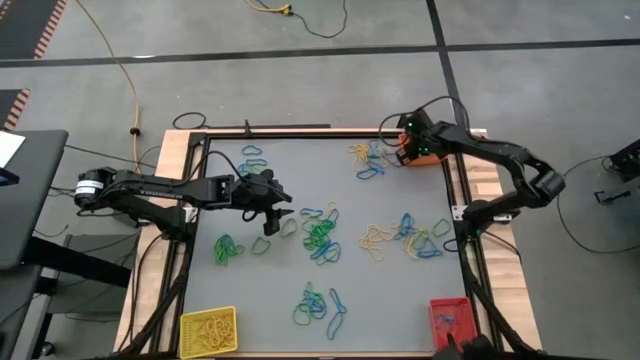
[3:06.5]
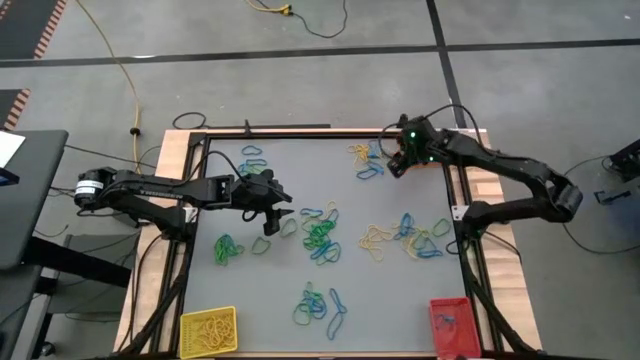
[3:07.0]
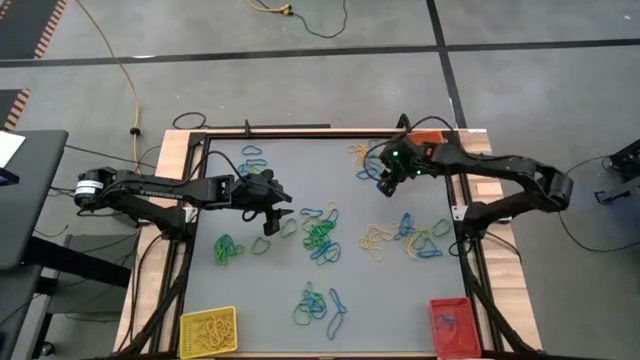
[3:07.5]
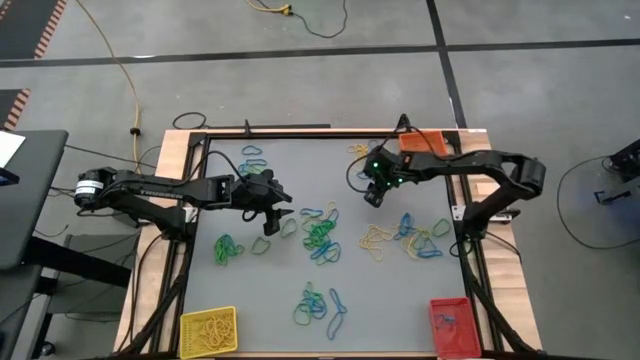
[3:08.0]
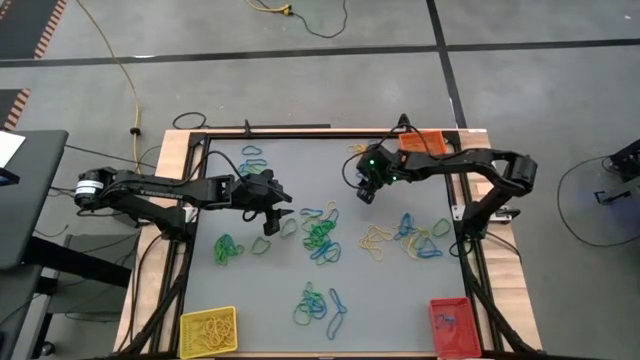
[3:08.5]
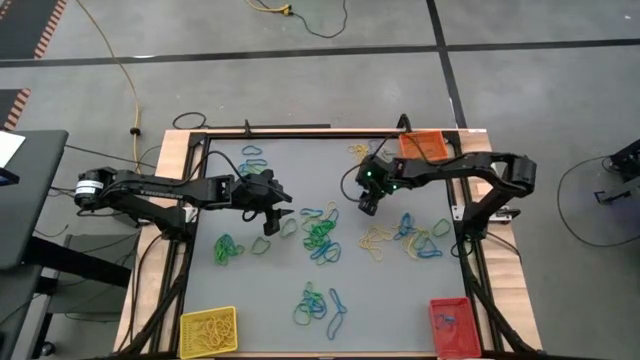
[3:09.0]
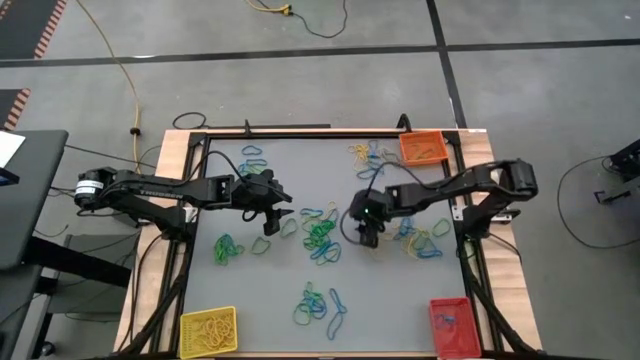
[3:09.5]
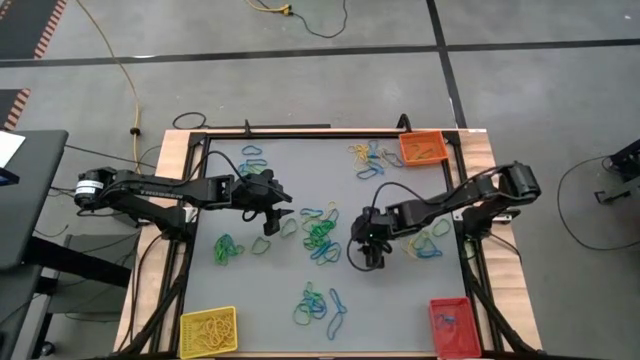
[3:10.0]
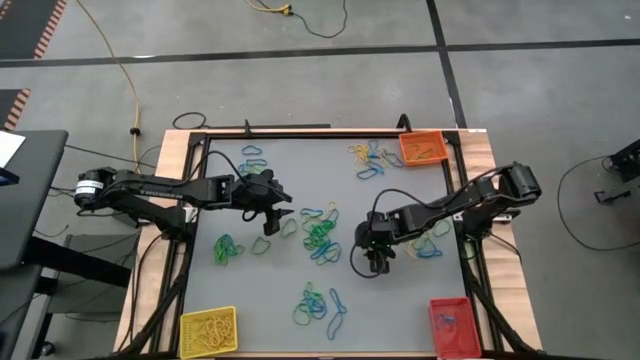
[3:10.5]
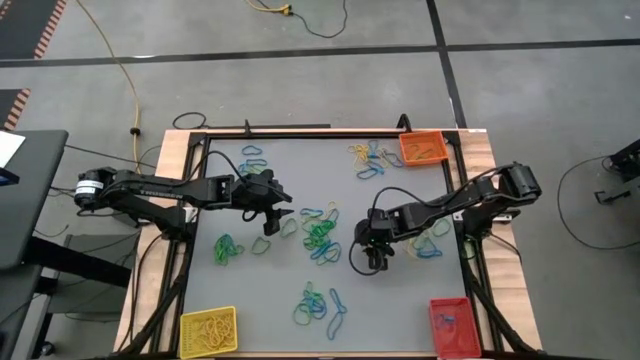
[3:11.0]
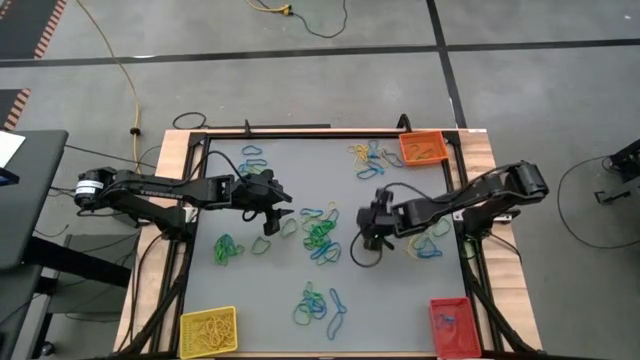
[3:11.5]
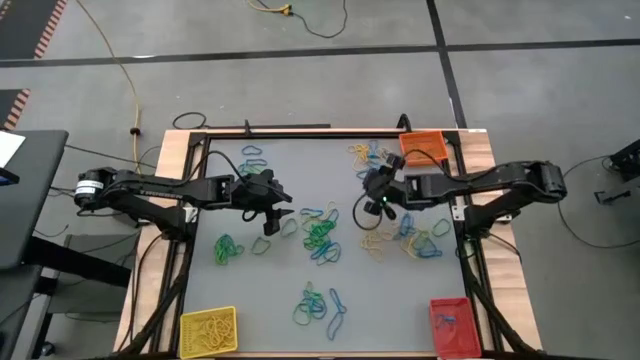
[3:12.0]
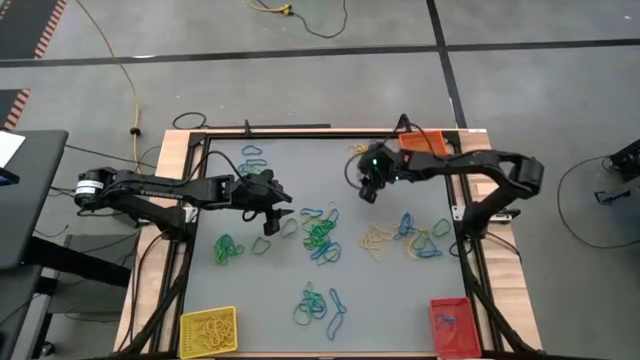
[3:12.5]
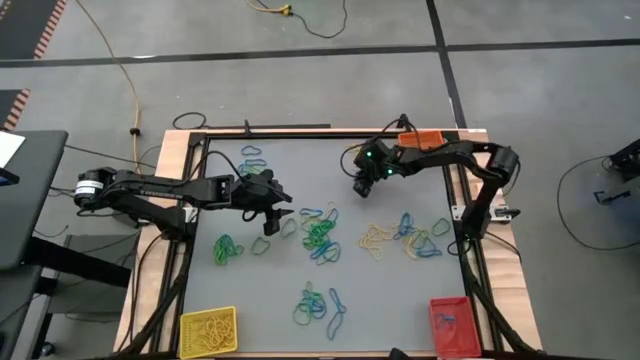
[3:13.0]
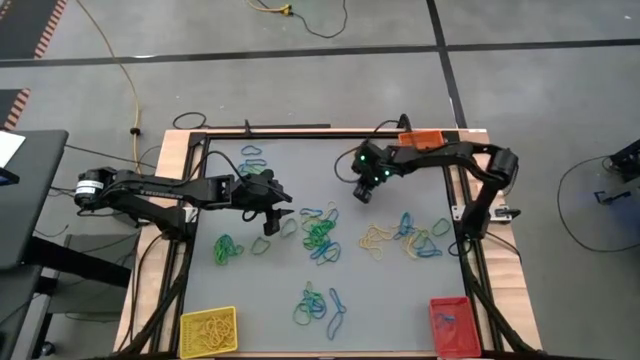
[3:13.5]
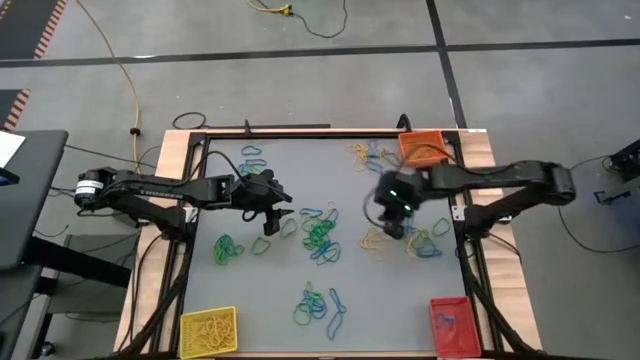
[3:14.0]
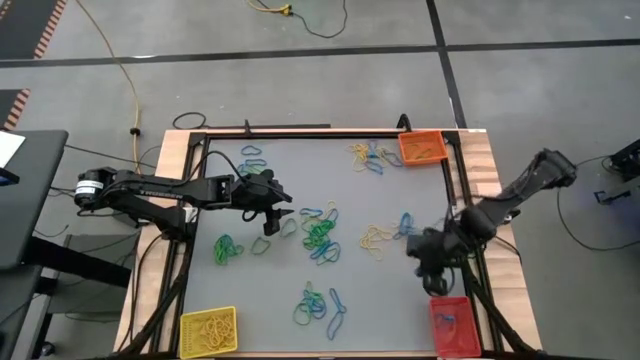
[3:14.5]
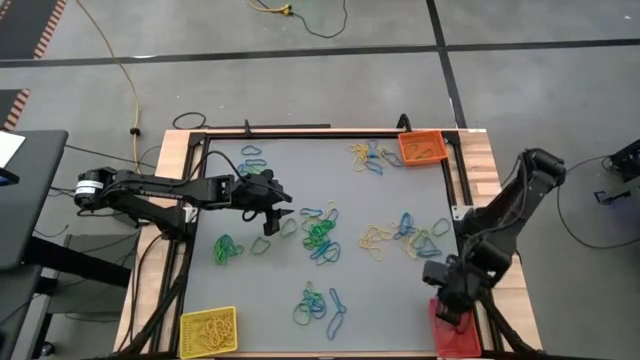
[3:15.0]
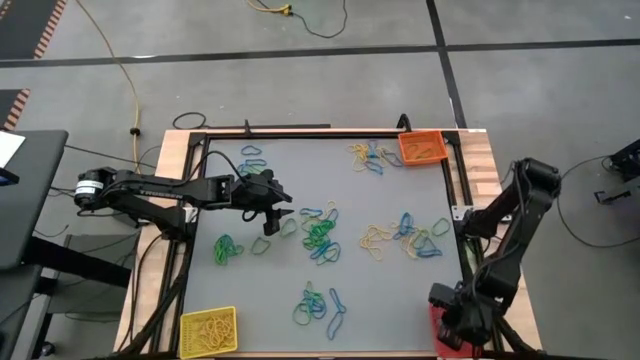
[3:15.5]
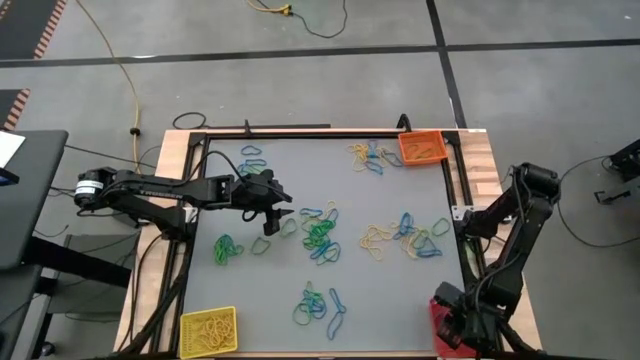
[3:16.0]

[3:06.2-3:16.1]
Task: Sort rubber bands into baskets
Put the blue rubber band into the red bin

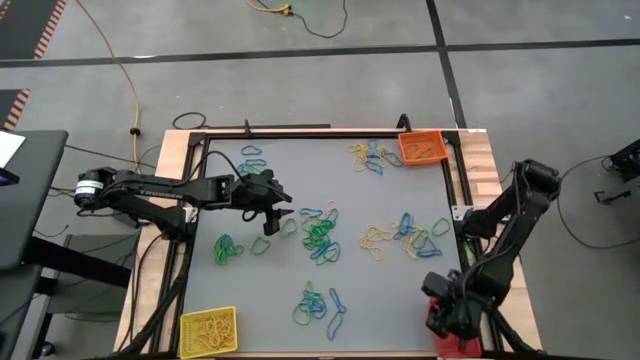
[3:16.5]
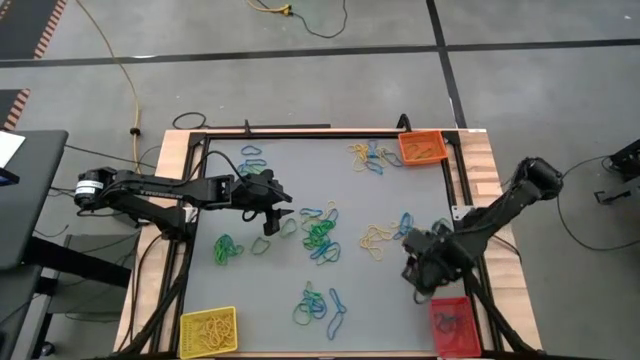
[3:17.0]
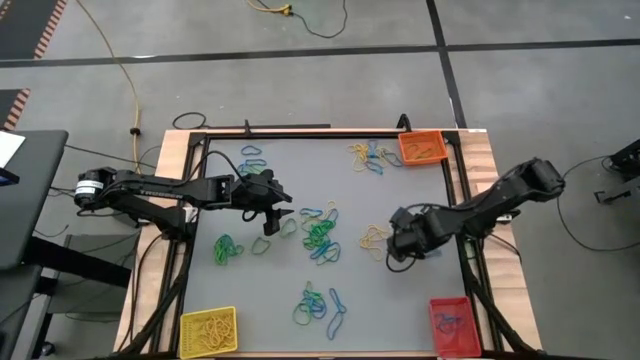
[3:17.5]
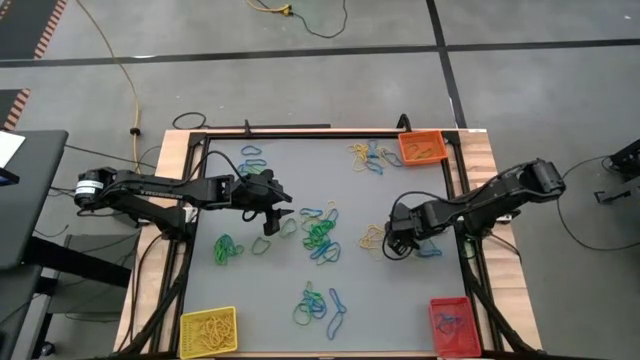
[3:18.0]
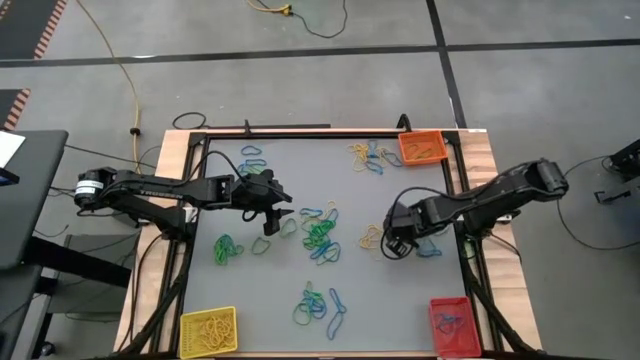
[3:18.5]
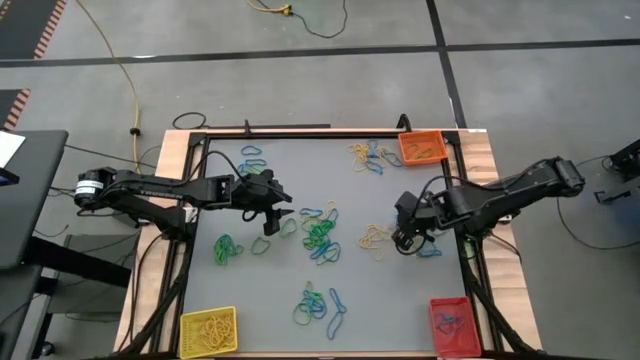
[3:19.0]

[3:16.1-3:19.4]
Put the blue rubber band into the red bin

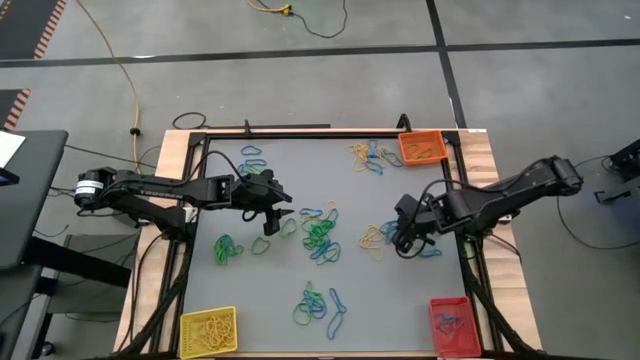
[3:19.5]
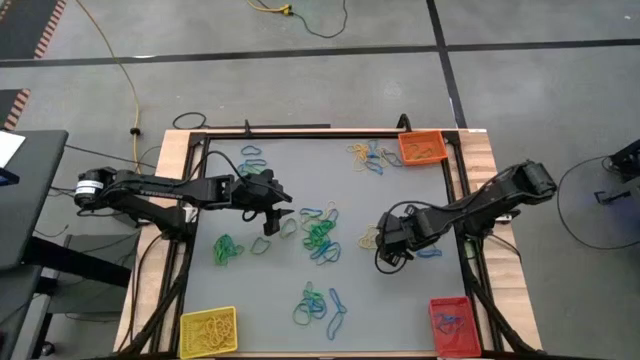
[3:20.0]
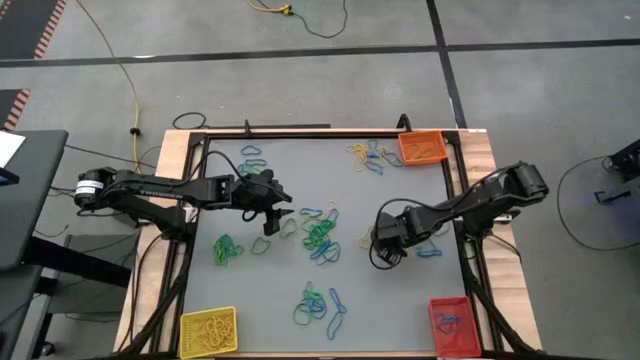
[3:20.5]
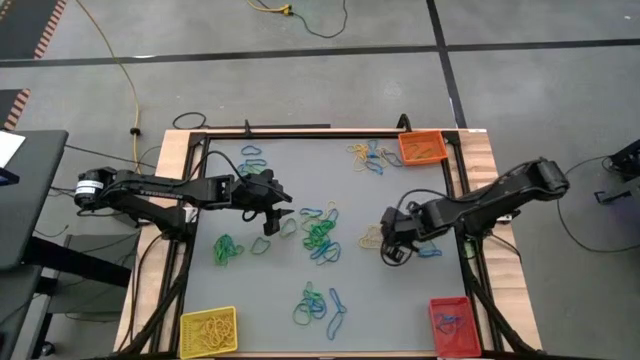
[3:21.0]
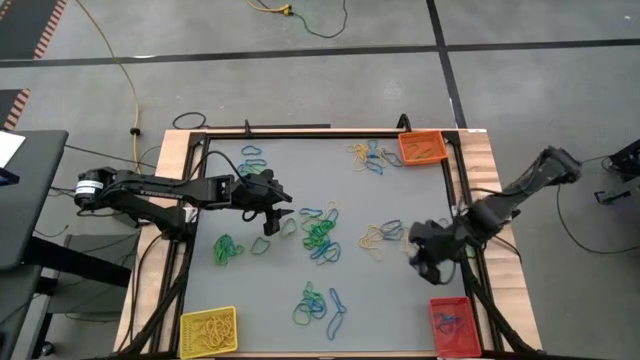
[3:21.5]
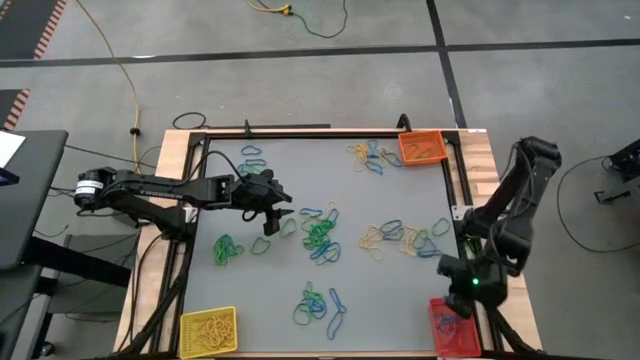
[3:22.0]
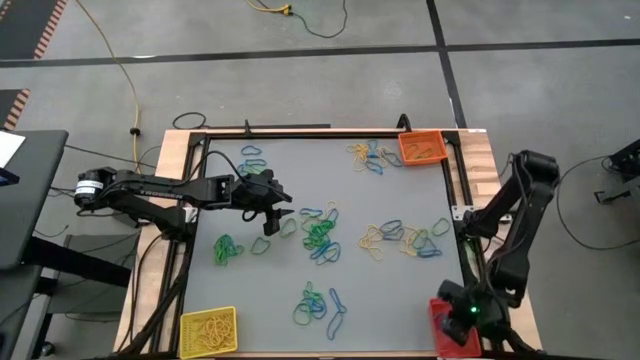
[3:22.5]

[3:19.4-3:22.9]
Put the blue rubber band into the red bin

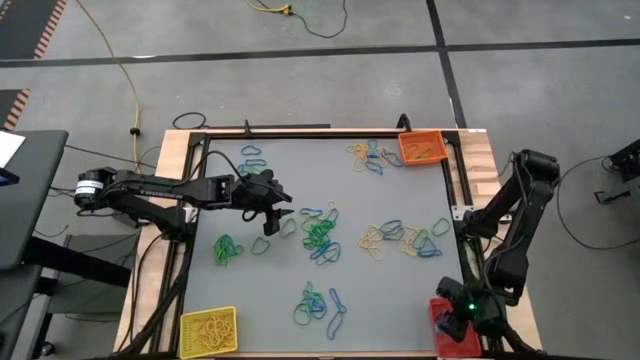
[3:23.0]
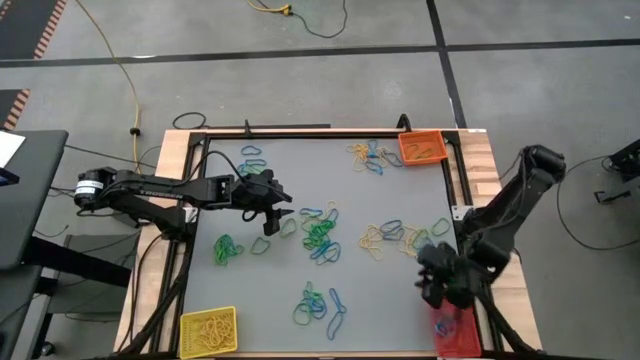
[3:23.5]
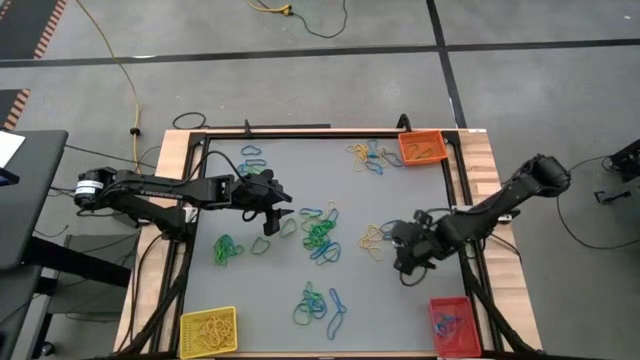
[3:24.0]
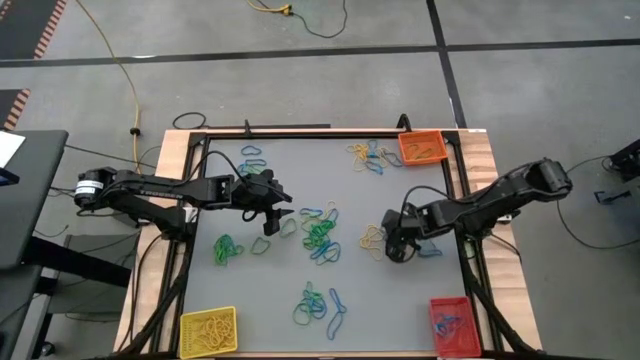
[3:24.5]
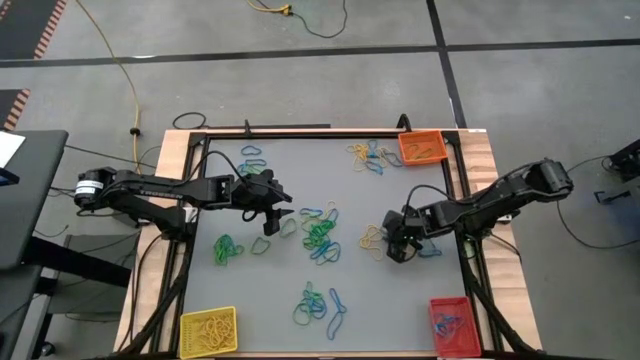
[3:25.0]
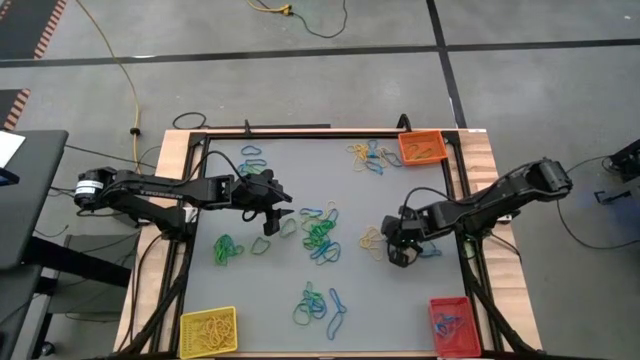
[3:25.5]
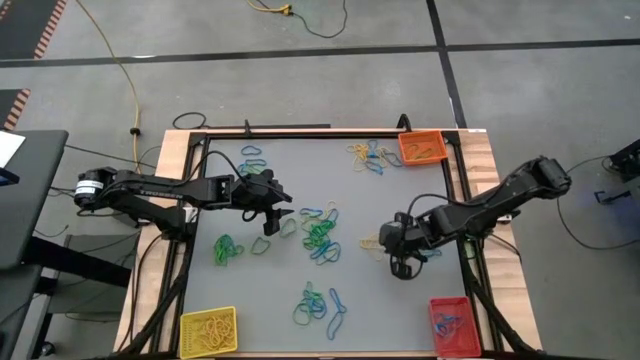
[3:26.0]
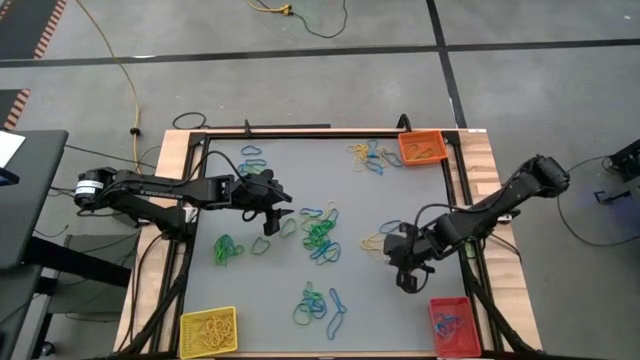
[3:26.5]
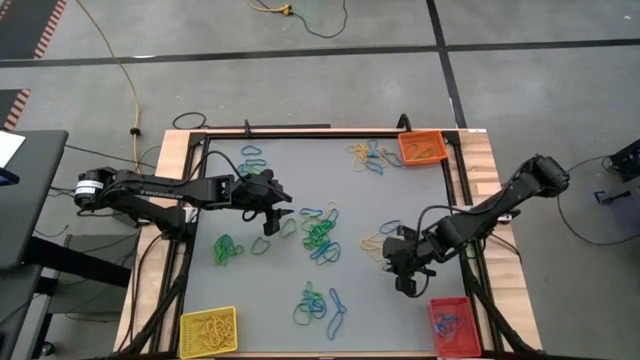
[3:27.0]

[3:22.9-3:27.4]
Put the blue rubber band into the red bin

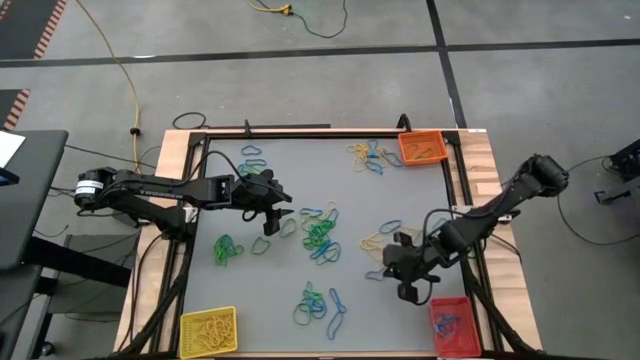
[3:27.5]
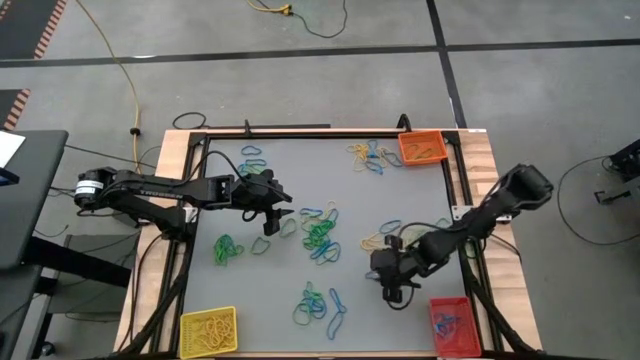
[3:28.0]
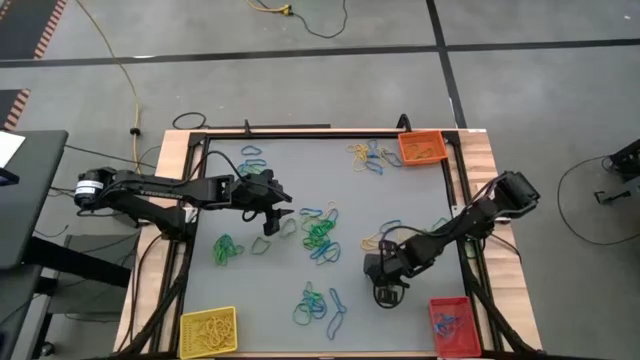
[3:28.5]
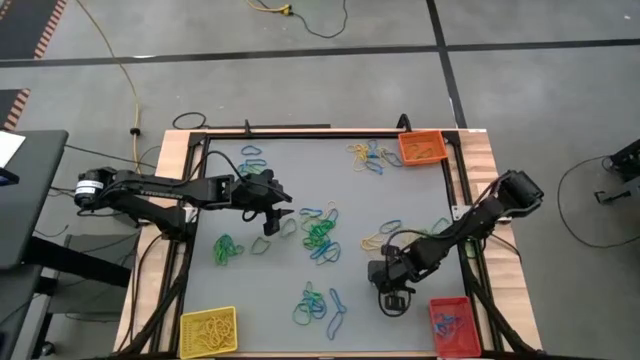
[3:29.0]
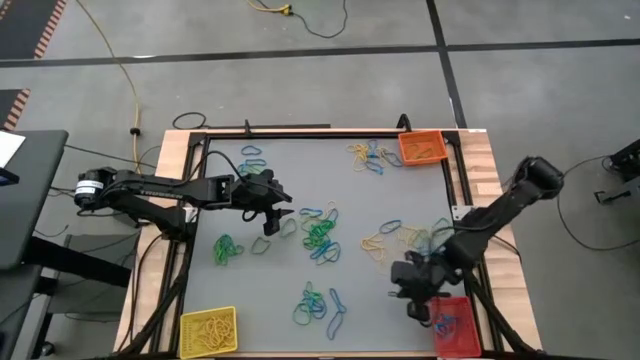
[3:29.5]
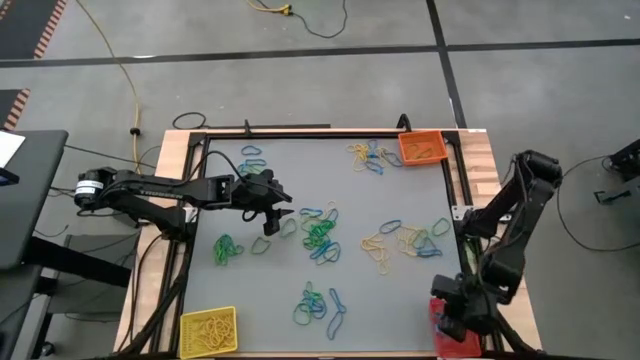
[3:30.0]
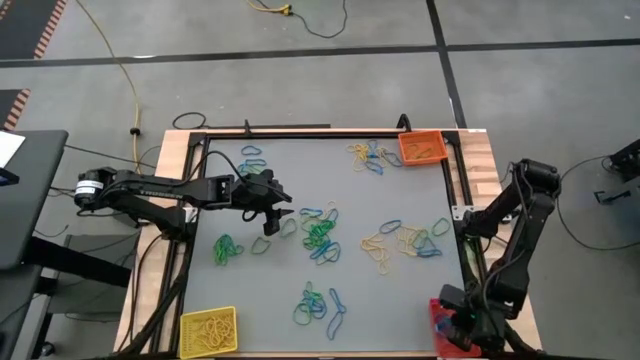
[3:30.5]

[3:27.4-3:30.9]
Put the blue rubber band into the red bin
